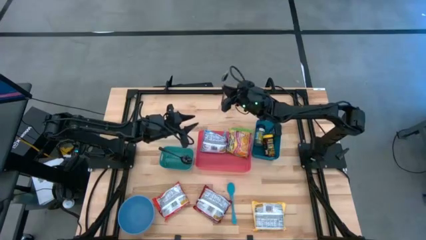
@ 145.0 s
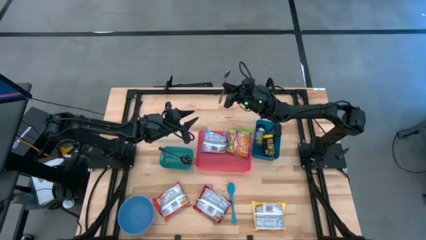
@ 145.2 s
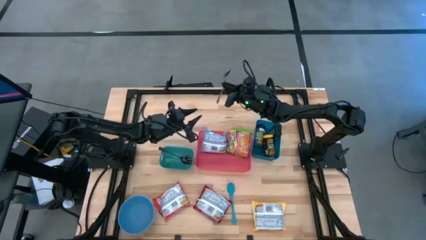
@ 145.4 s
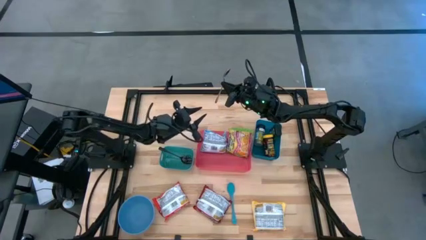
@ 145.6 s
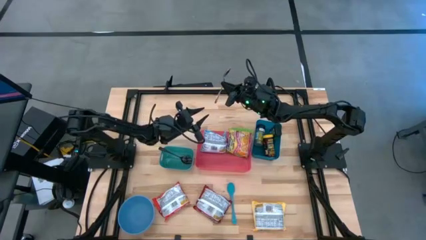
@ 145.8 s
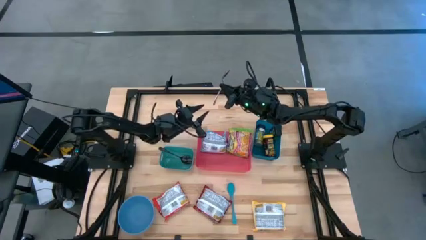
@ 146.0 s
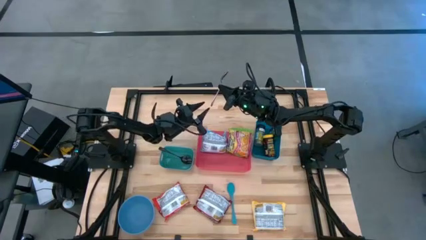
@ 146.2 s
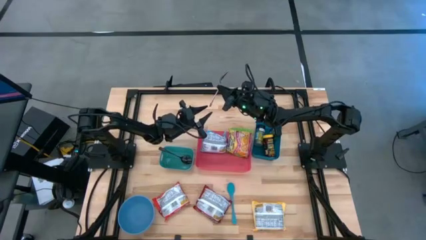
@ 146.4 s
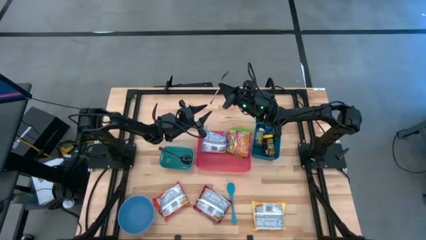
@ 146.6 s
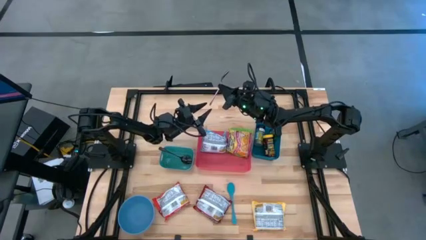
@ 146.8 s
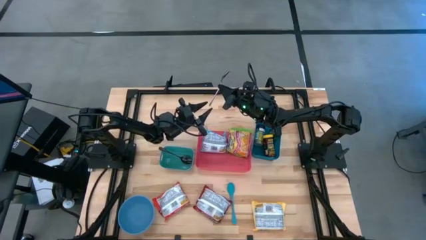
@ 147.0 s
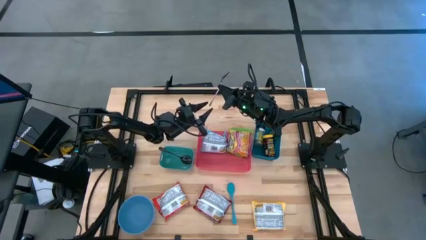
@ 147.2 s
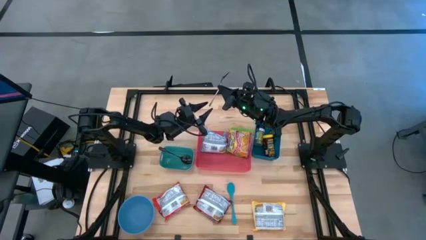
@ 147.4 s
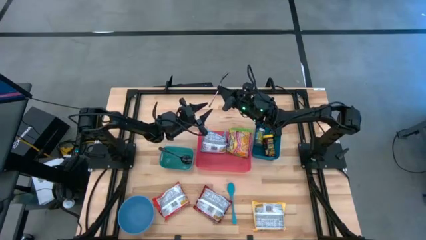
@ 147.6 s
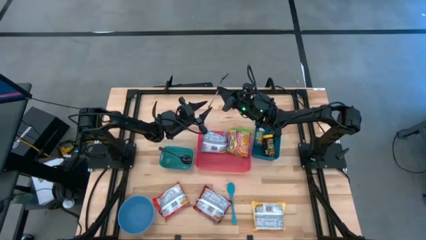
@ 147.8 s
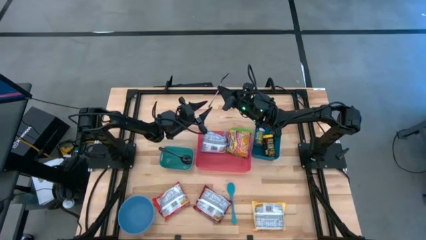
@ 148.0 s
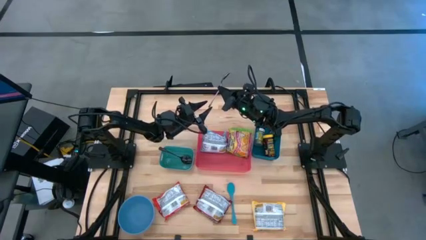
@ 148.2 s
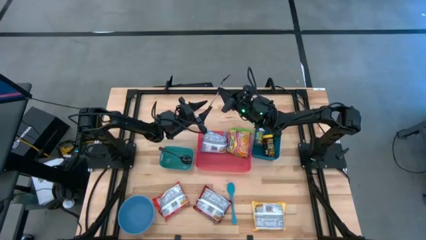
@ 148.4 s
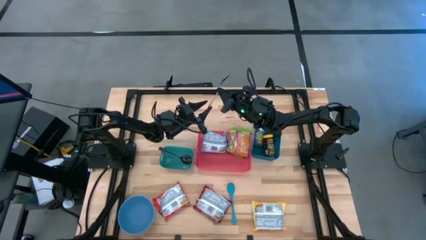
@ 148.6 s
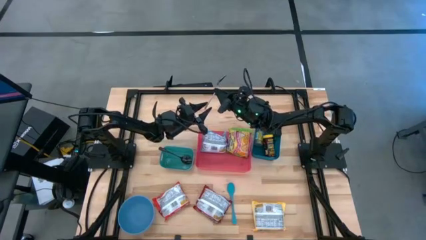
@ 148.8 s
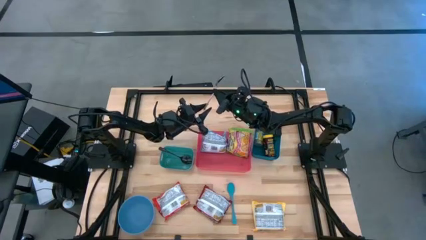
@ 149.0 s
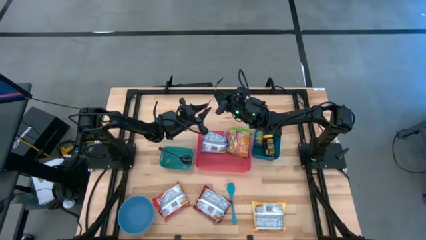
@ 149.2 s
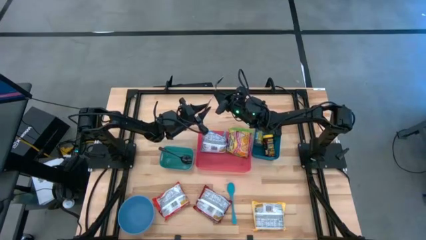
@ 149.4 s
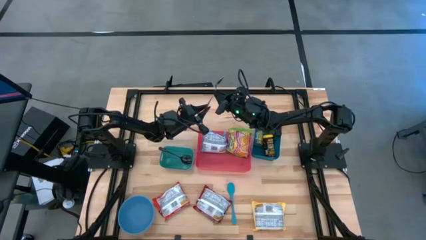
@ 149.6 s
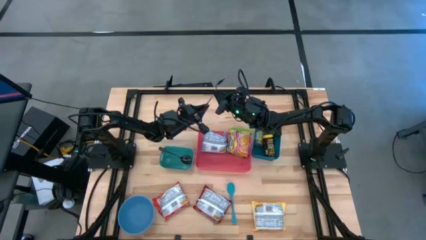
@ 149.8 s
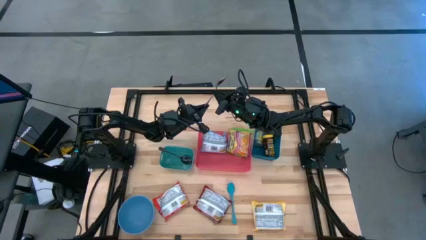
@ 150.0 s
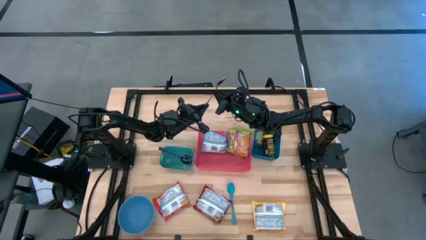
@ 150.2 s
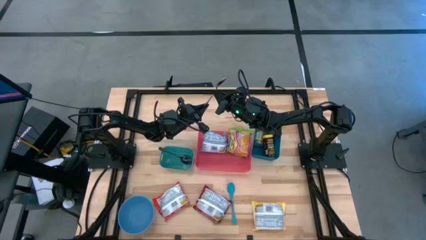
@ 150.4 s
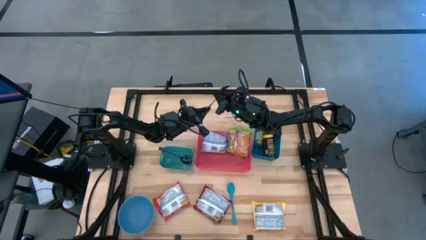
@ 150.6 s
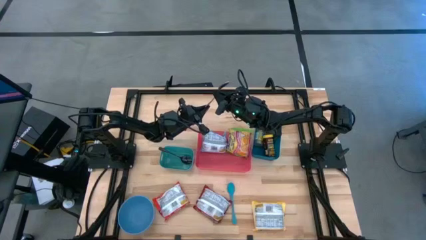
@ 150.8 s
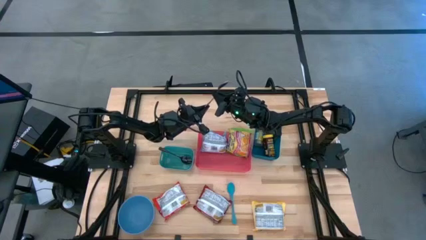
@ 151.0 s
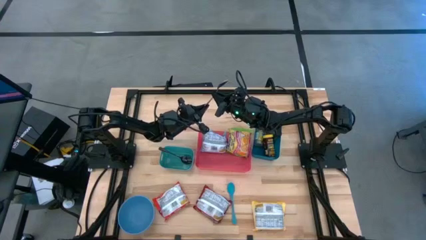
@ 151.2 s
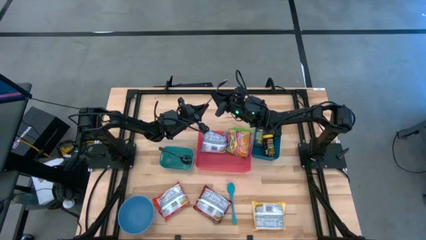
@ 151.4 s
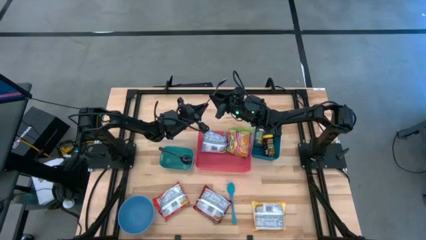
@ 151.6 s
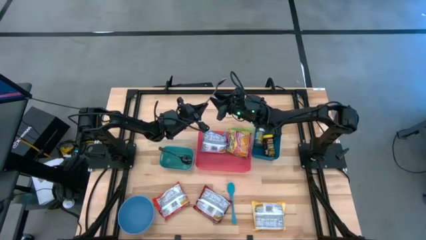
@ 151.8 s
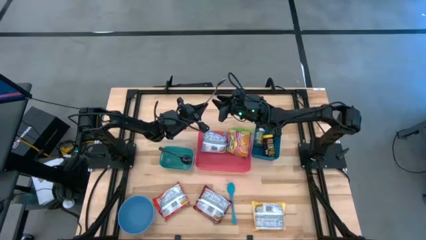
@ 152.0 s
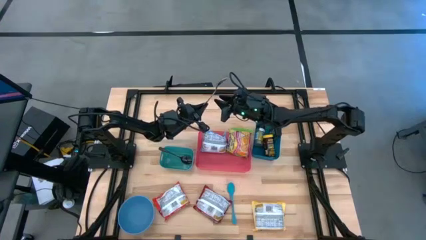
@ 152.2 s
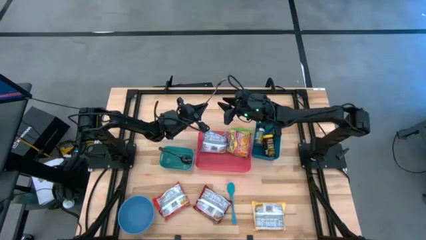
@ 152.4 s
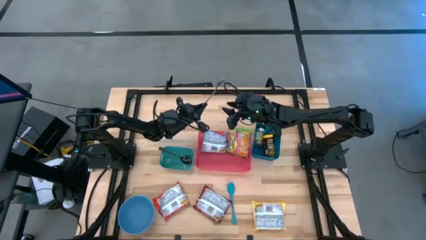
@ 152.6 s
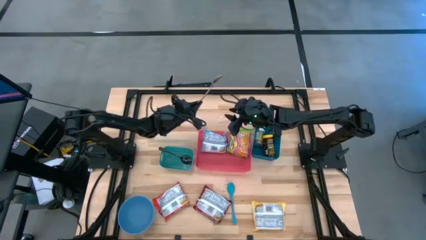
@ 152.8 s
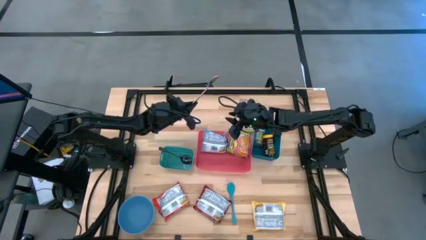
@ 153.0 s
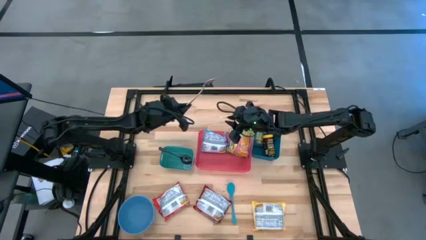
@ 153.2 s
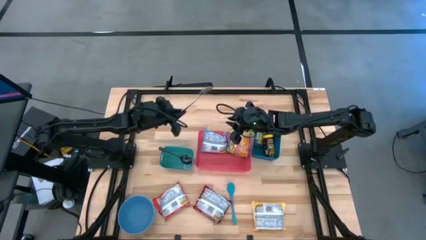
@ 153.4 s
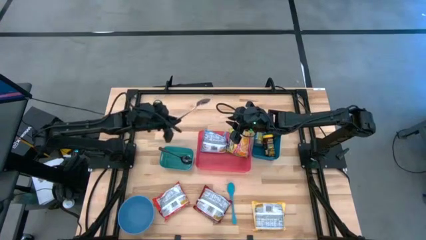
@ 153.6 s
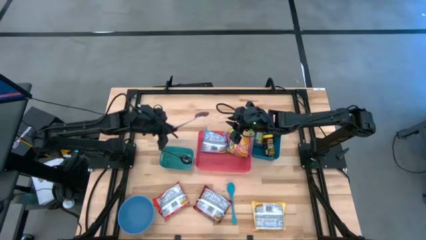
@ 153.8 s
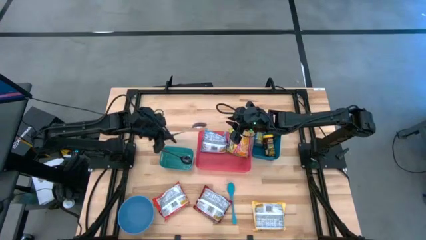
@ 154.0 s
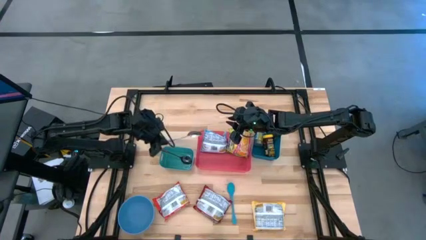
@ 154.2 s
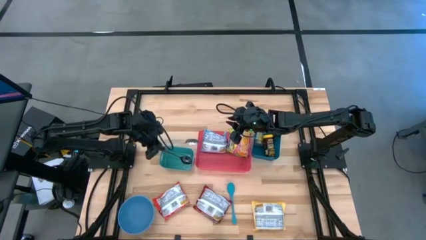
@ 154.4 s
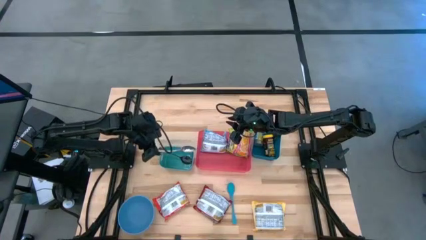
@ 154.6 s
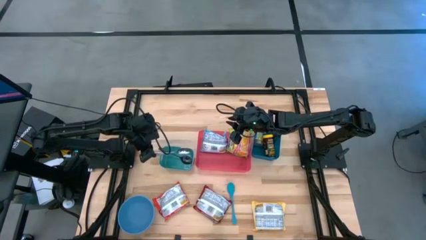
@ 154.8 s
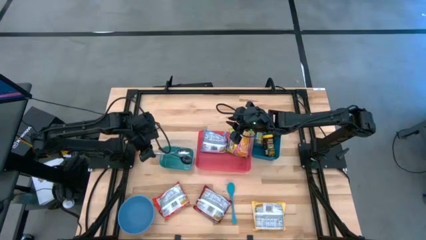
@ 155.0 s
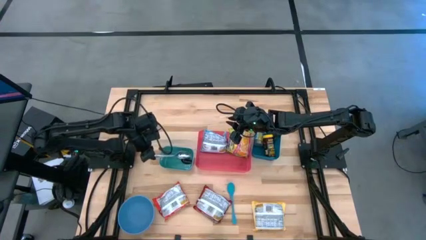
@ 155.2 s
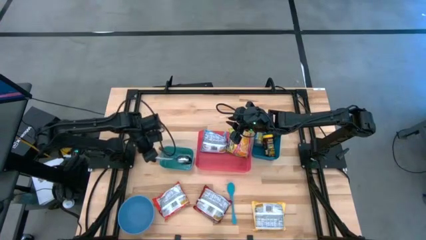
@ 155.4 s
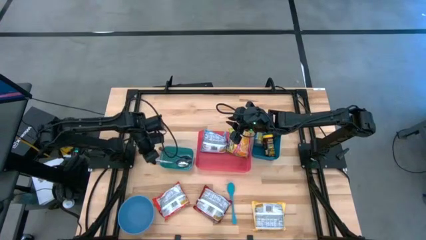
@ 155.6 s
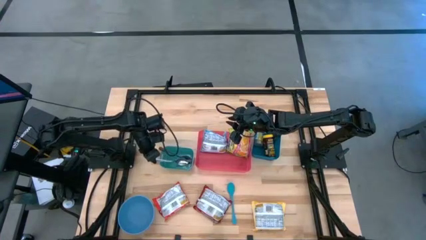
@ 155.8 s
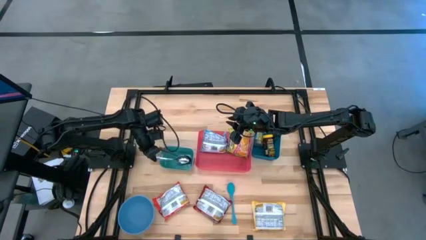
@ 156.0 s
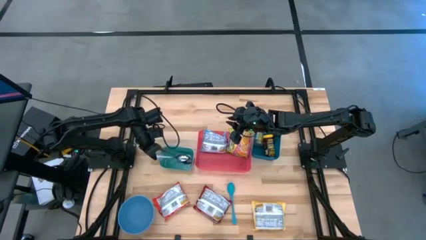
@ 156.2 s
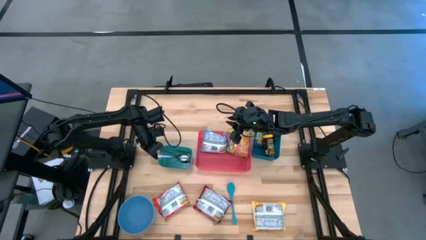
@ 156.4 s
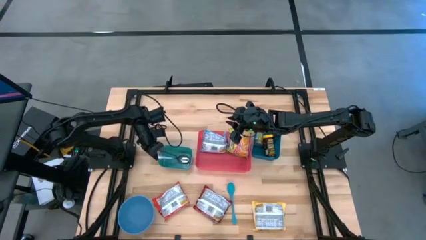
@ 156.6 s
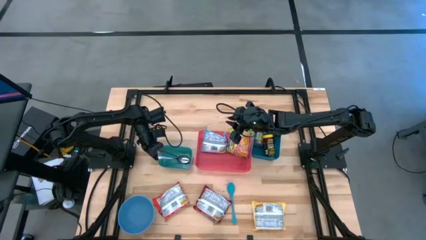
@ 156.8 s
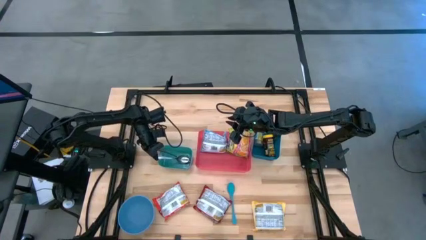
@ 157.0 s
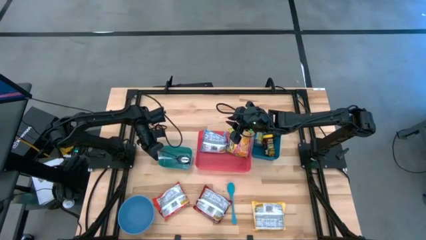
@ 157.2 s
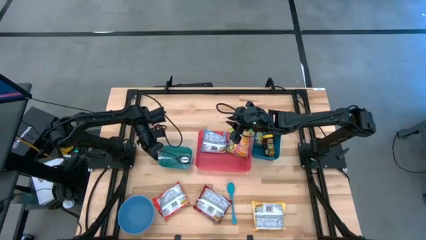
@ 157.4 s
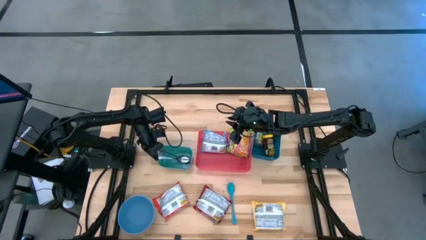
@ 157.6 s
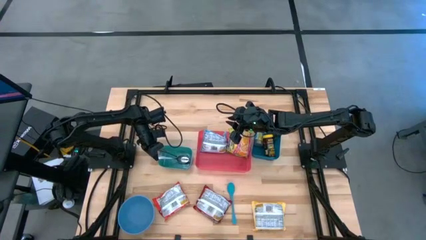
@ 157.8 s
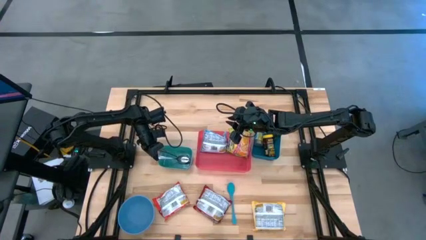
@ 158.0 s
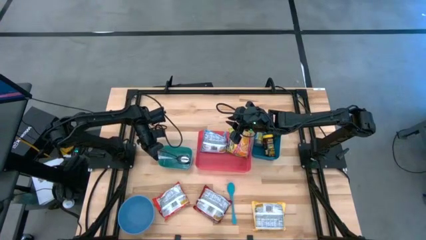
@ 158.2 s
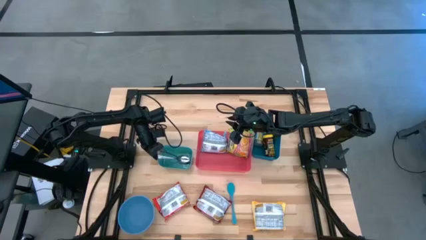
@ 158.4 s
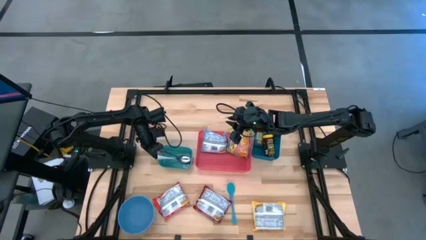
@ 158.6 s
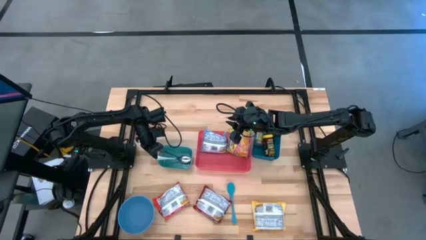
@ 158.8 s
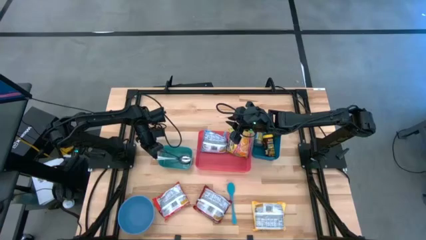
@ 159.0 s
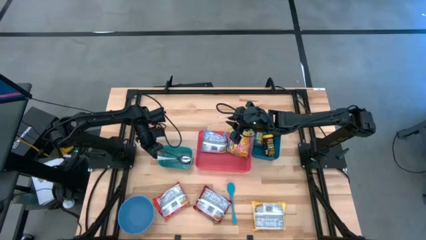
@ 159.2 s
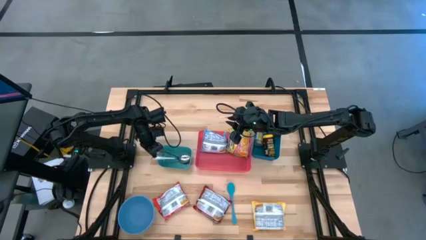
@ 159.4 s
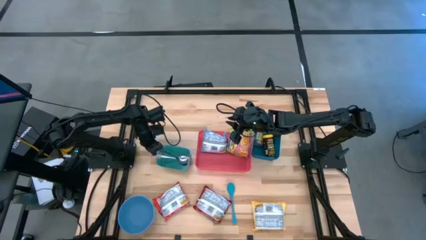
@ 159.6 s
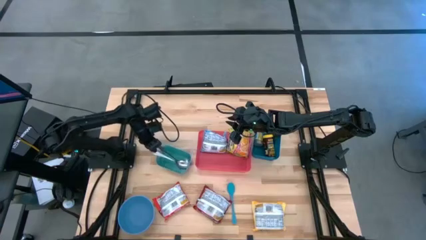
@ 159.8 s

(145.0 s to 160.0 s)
Task: Pick & Place Food Item
Put the silver spoon into the green bin
